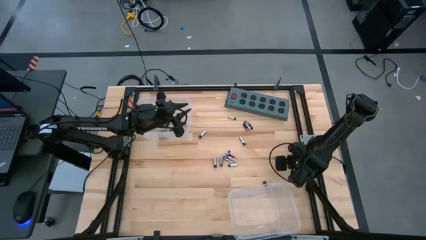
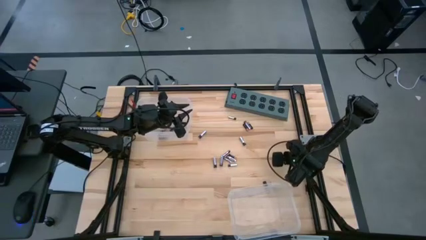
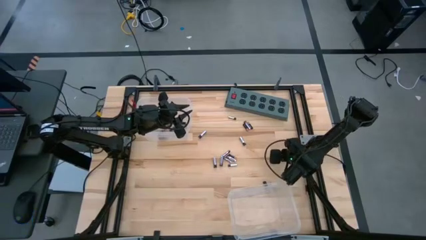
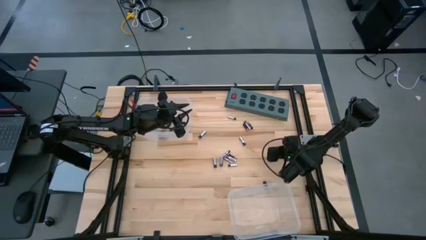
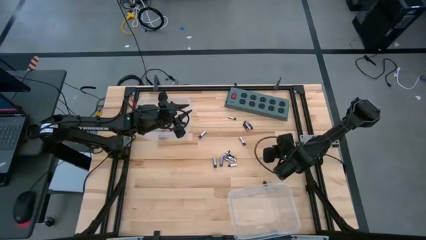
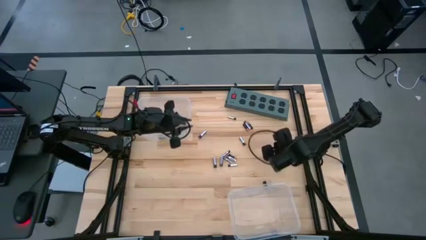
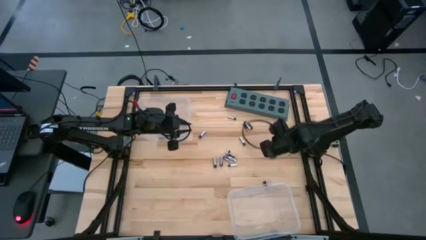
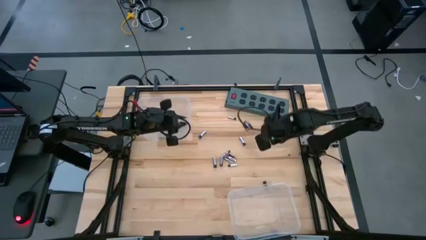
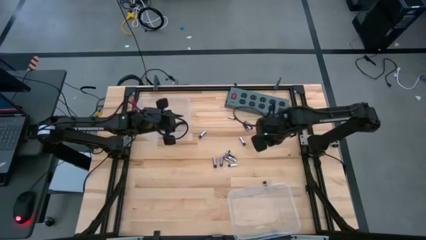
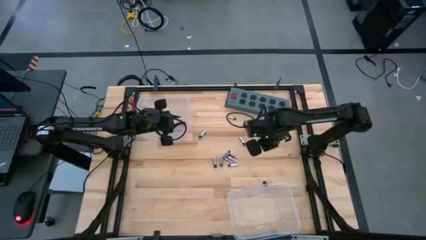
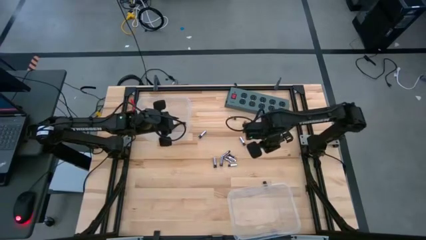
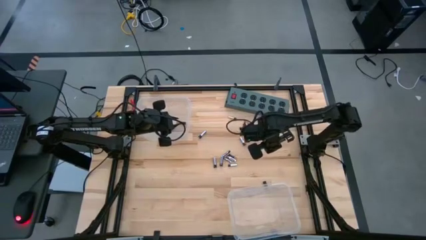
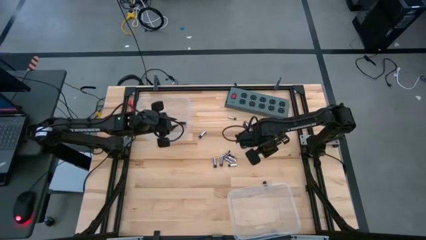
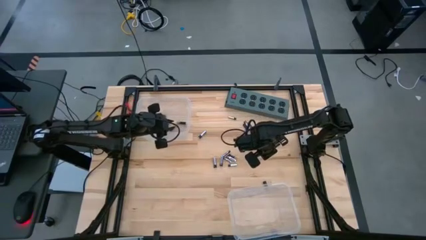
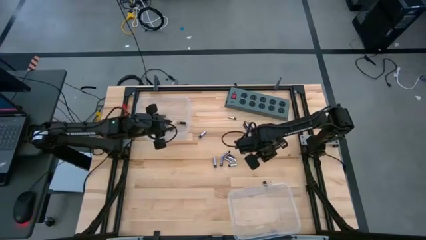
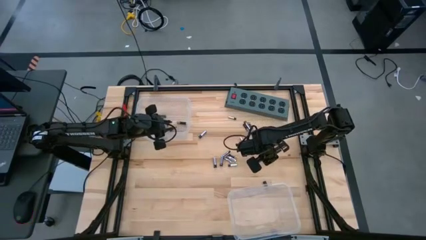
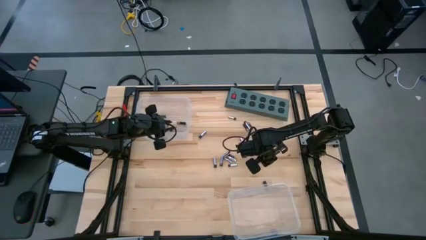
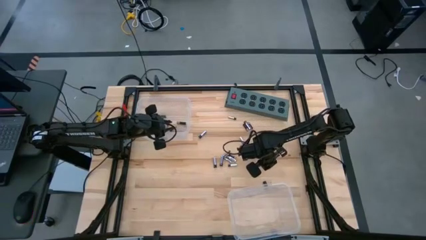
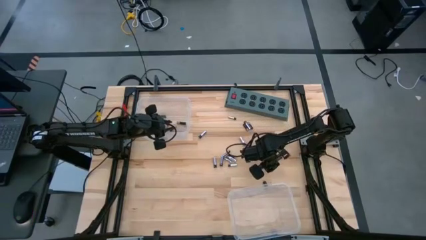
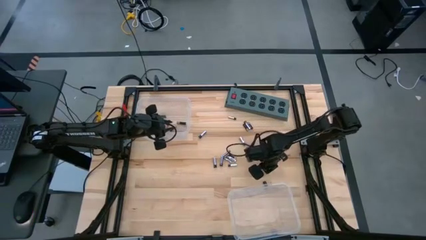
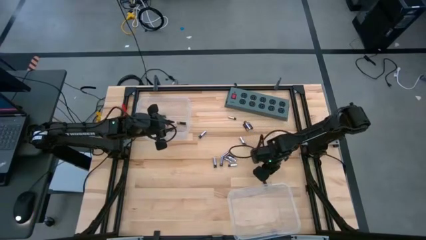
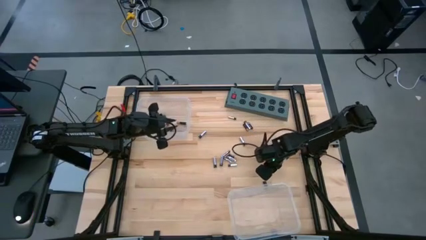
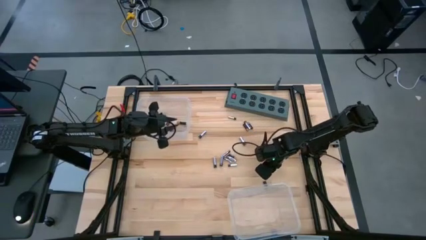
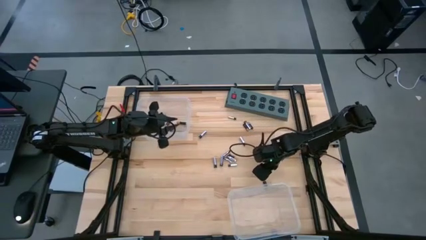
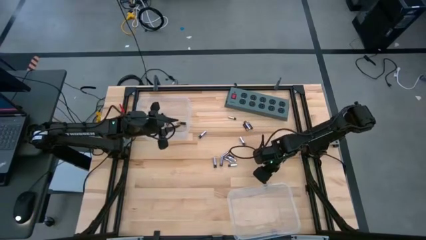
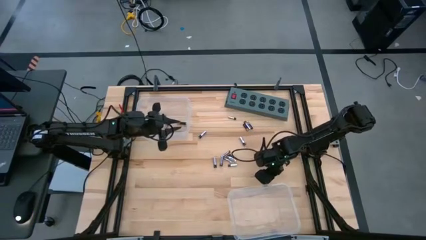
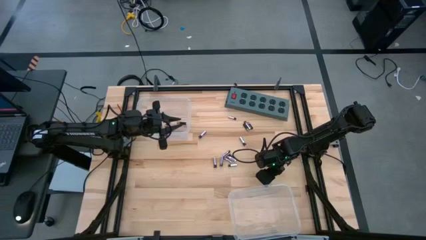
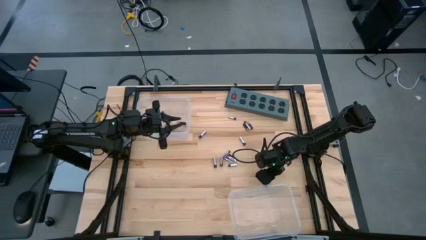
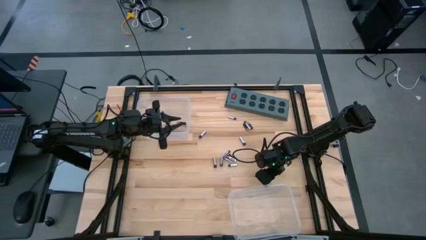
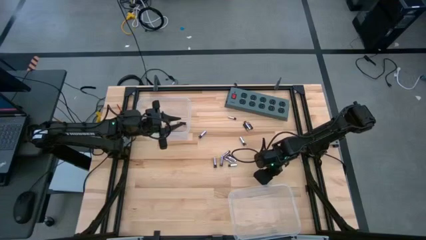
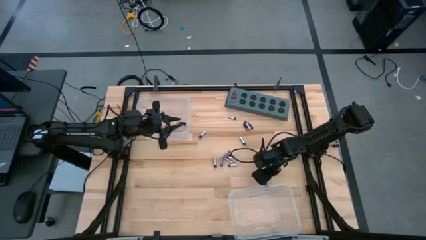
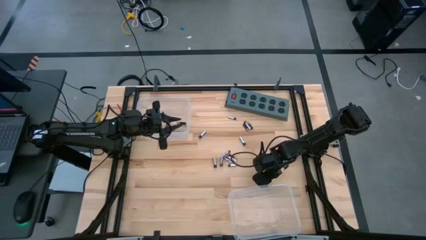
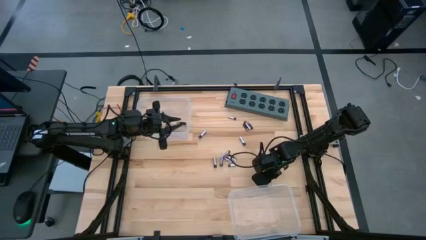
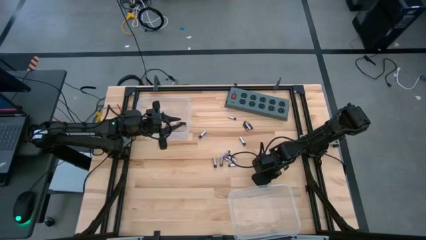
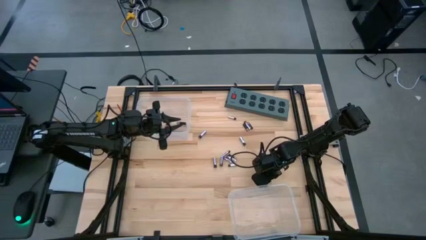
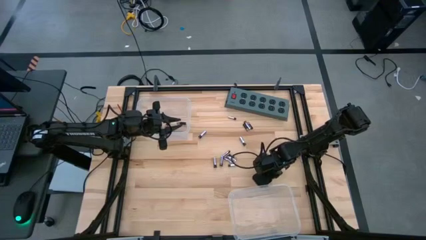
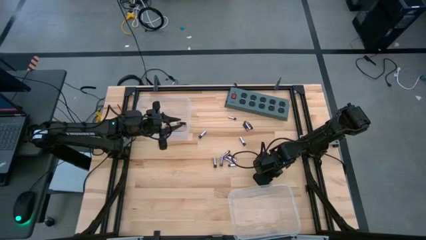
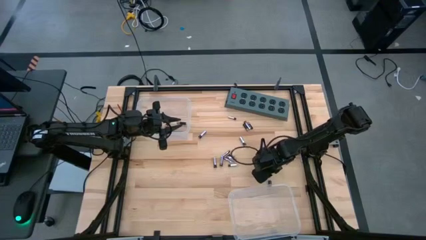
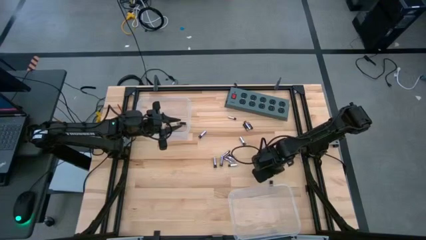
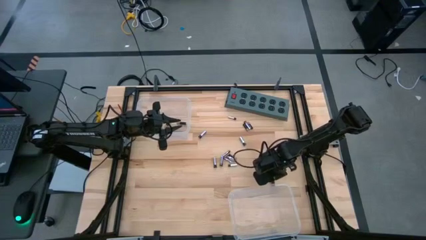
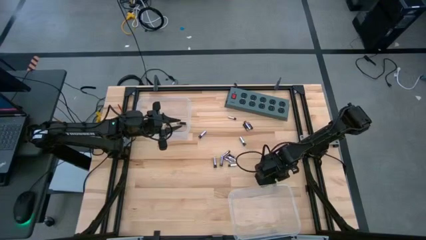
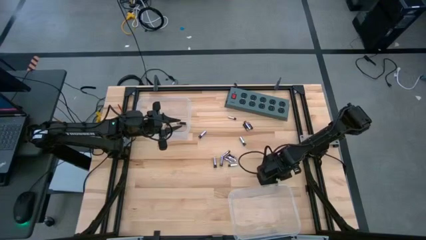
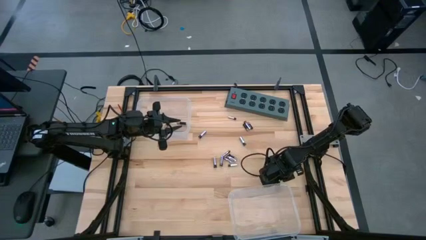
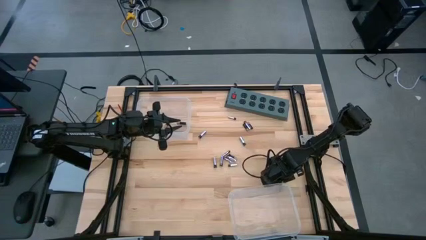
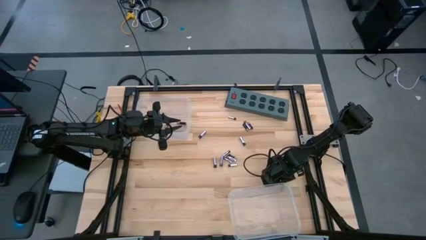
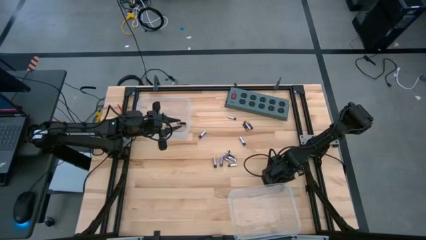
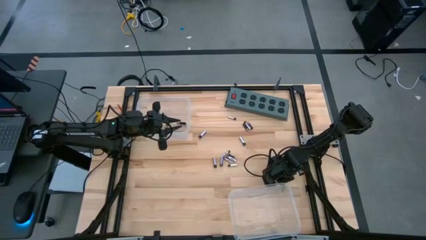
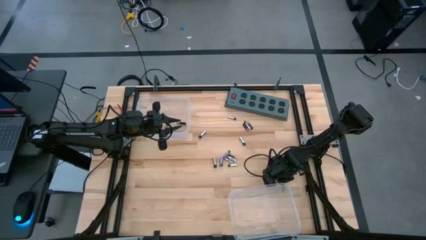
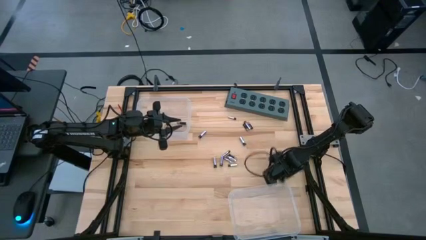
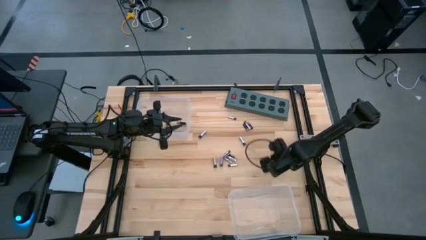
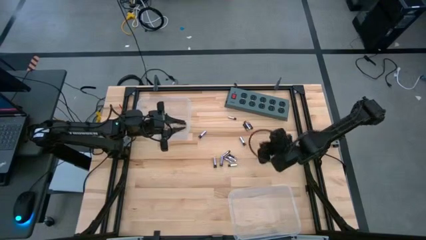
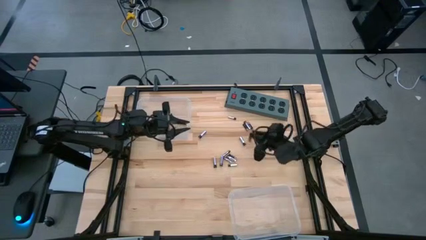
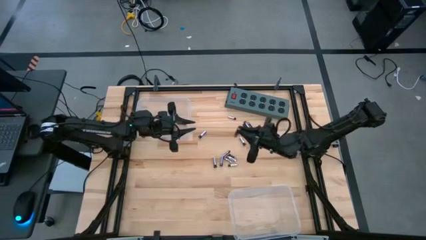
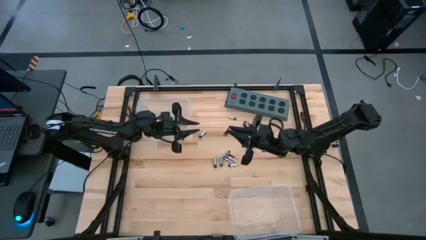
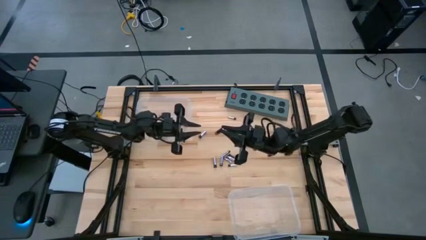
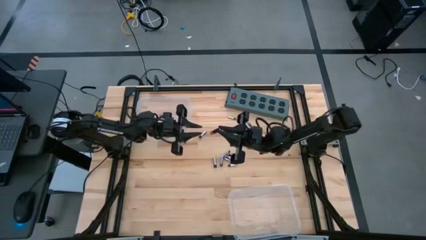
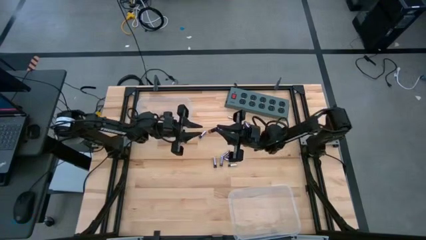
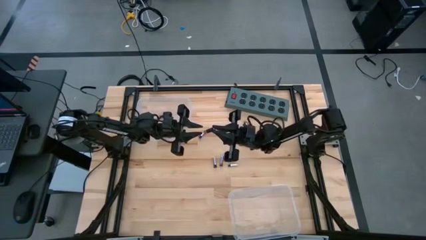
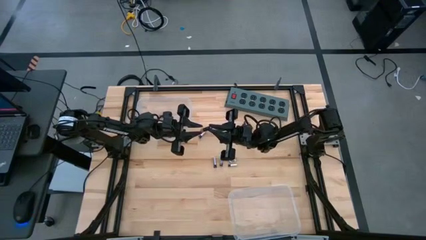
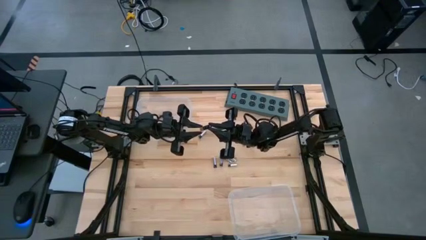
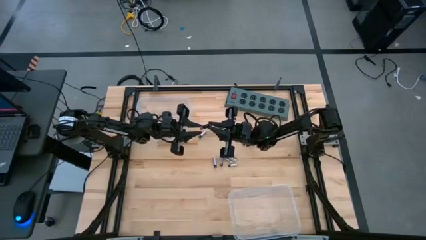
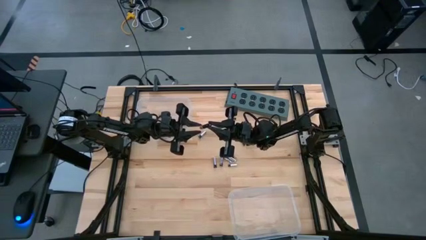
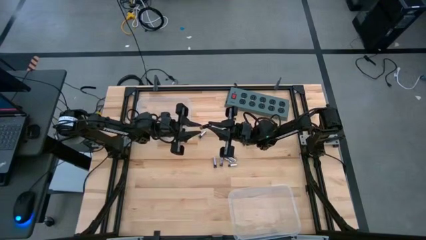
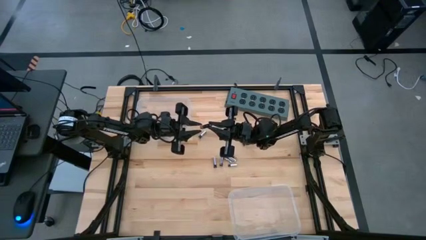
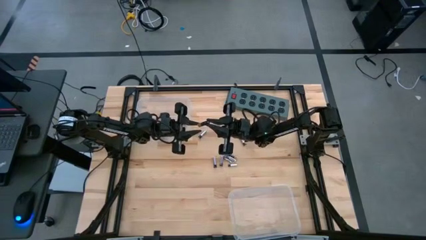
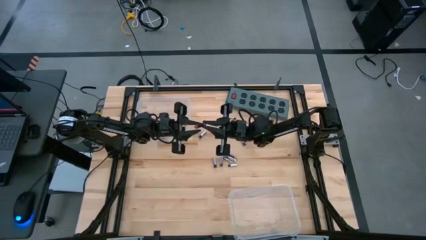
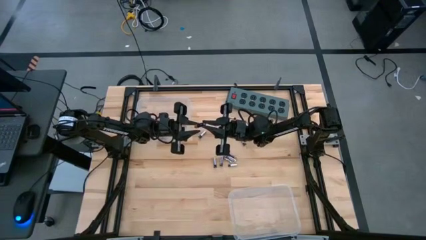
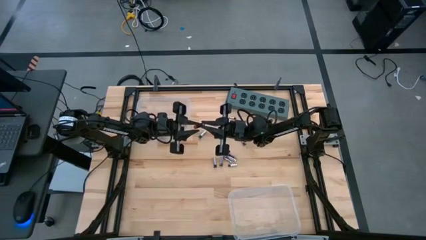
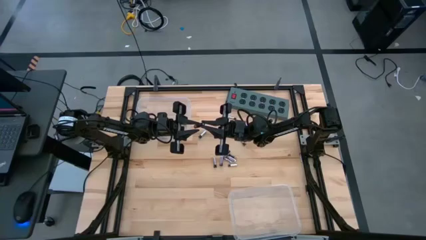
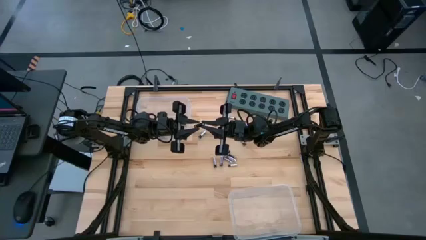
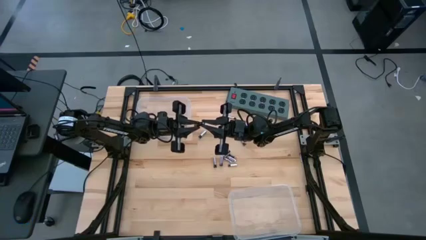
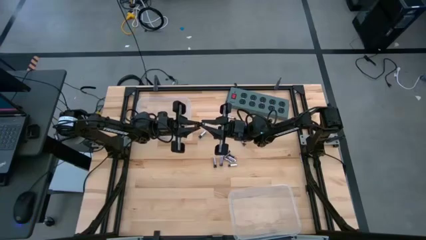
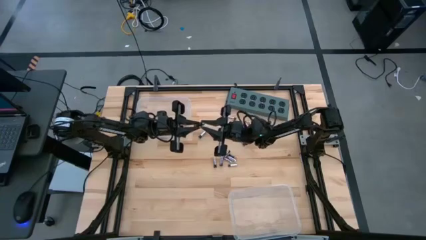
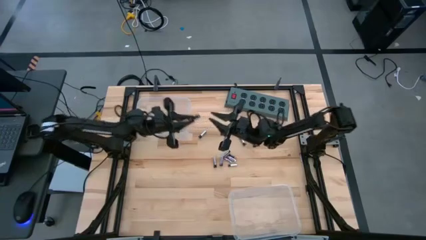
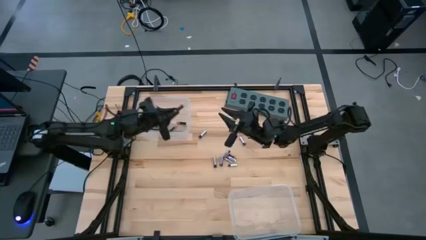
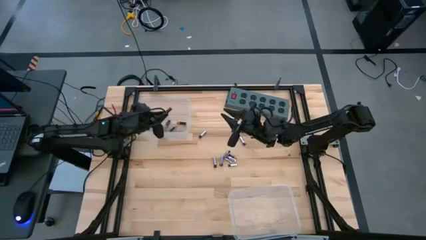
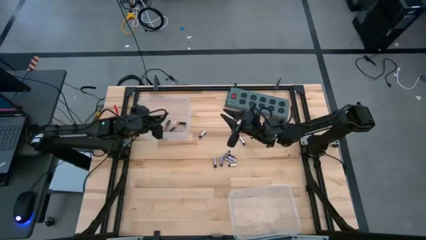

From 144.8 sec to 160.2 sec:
Task: Sort batteries
Put the black battery into the top transparent bin
